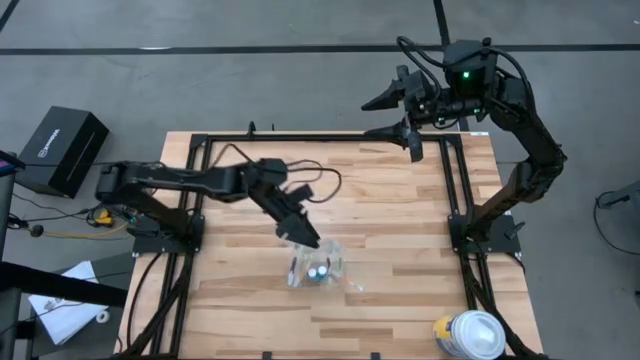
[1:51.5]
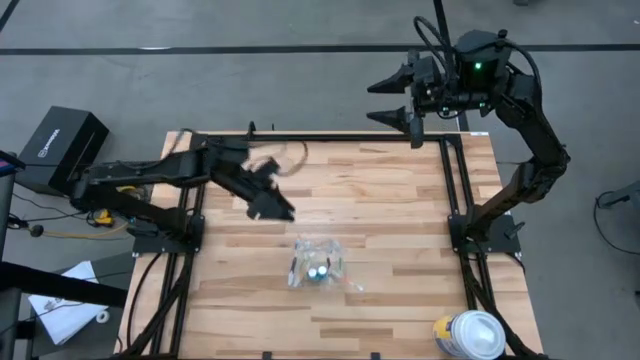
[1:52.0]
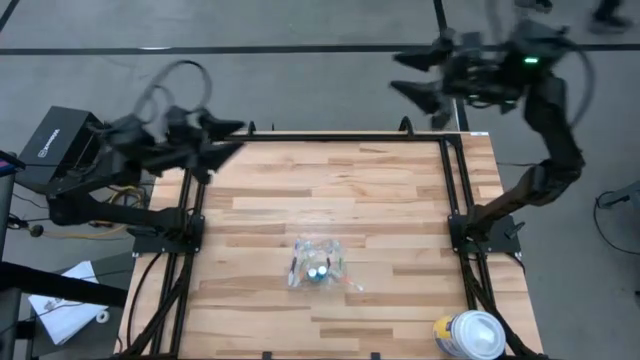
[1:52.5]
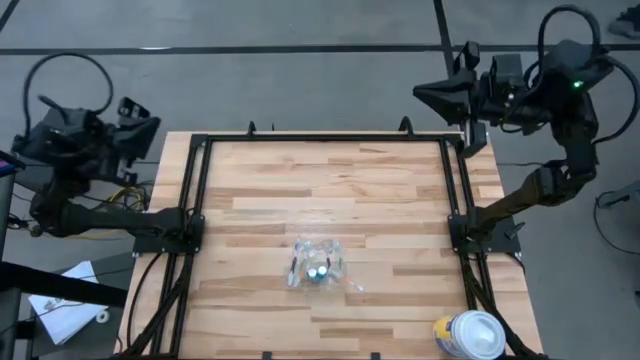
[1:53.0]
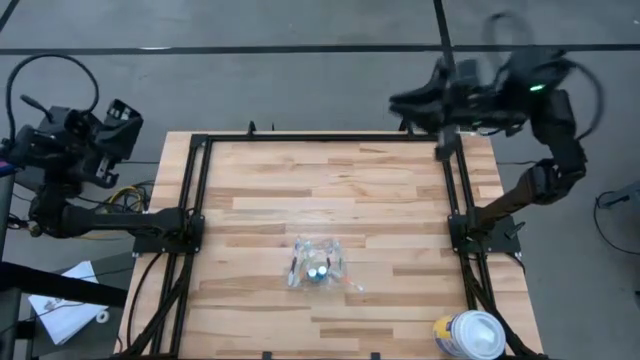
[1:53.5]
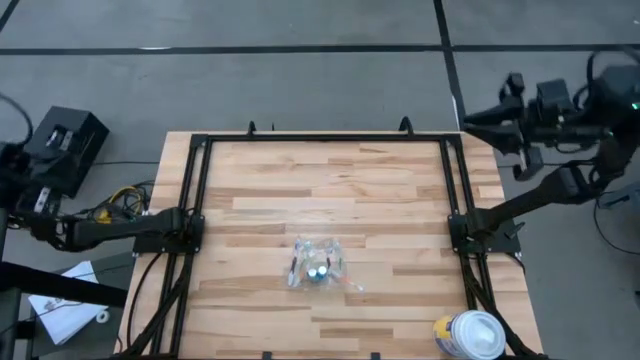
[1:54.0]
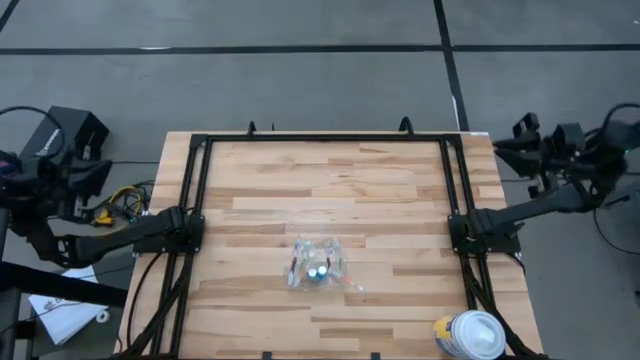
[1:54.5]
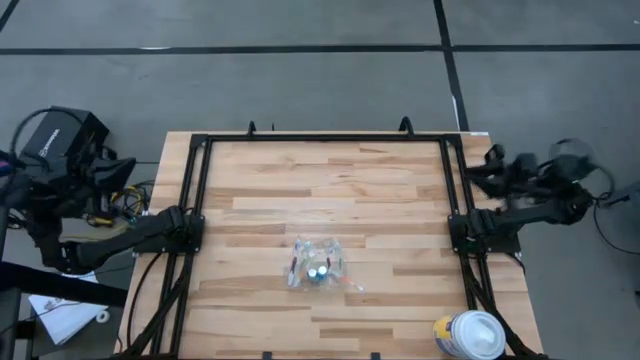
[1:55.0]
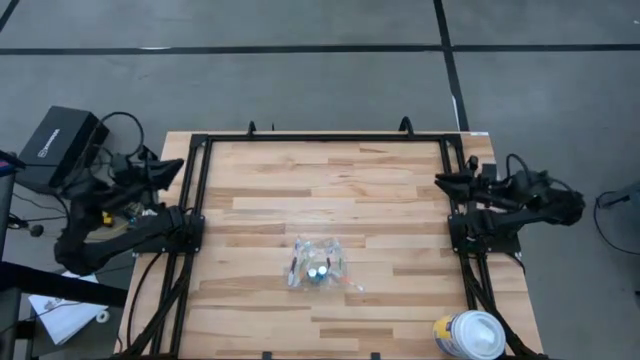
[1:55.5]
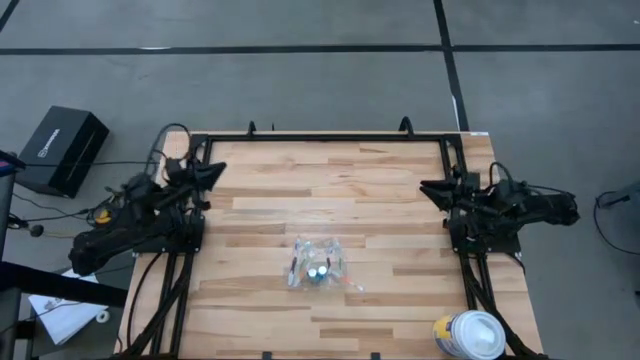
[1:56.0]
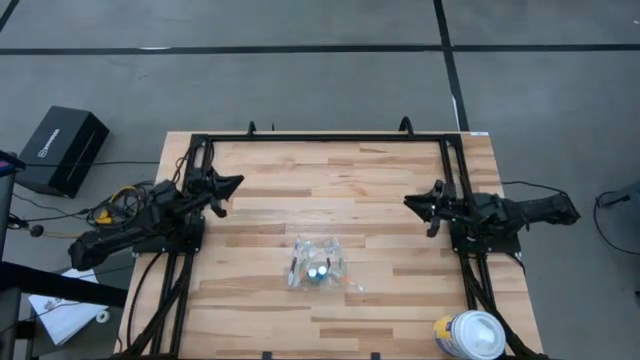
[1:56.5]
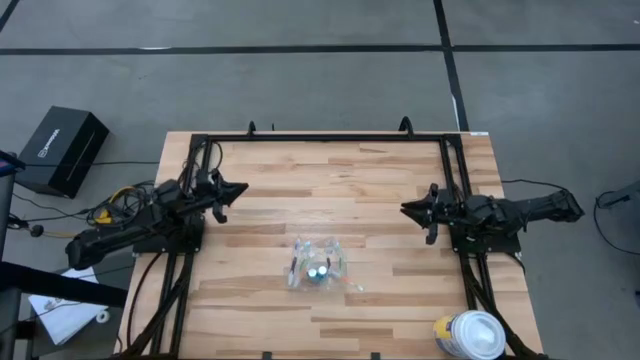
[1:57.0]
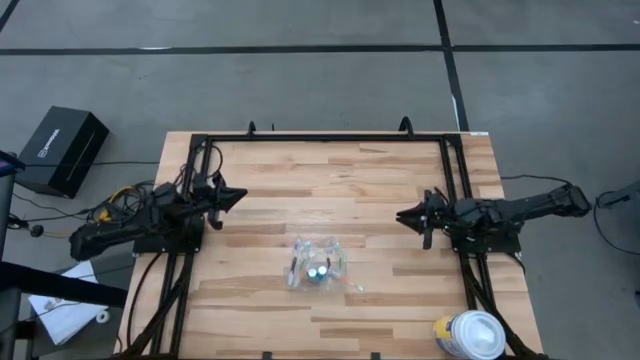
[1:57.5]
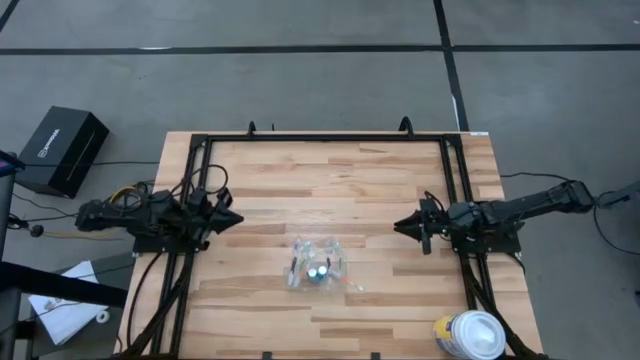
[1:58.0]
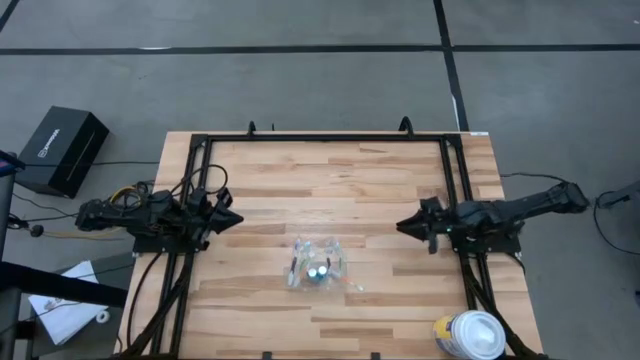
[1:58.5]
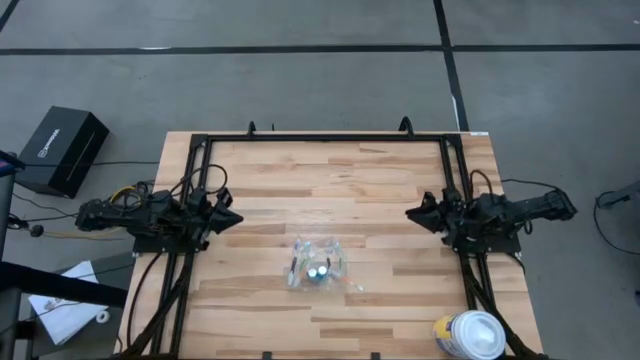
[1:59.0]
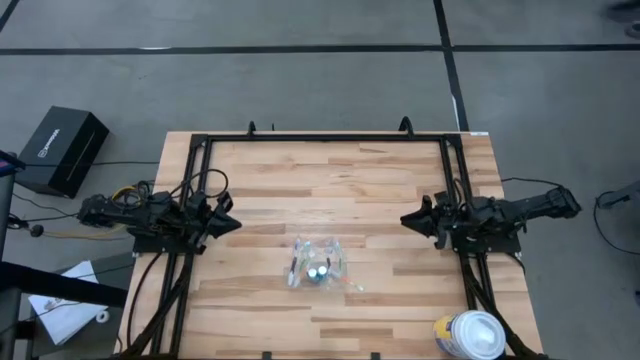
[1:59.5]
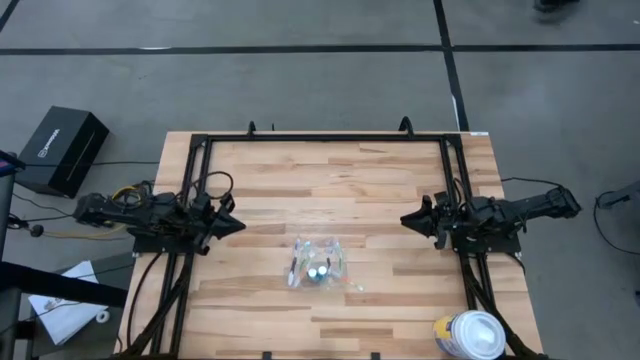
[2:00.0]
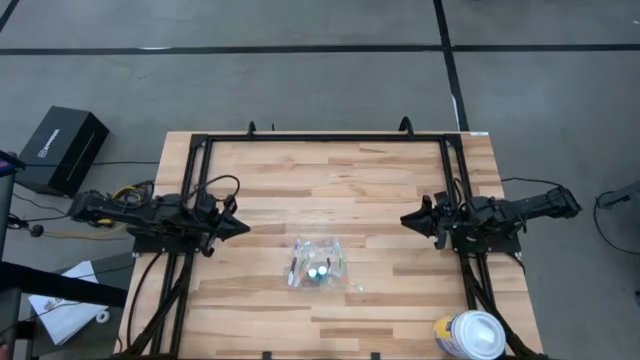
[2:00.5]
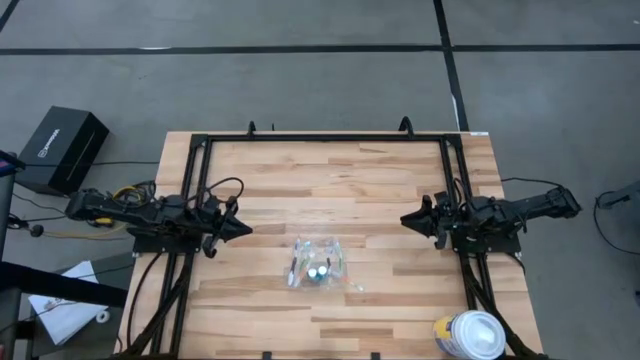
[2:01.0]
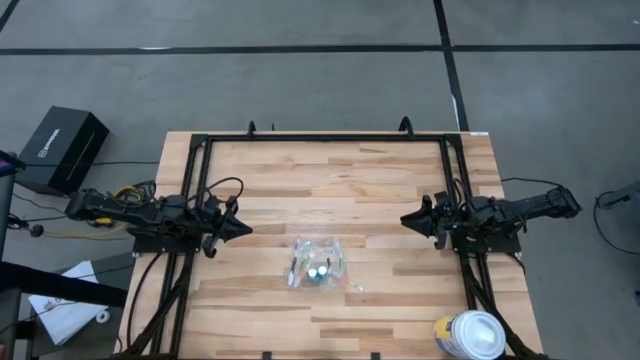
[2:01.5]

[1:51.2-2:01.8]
Task: Pick & Place toothbrushing station
Return to Home Position

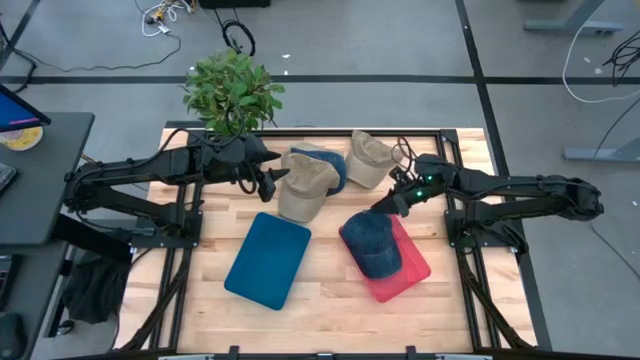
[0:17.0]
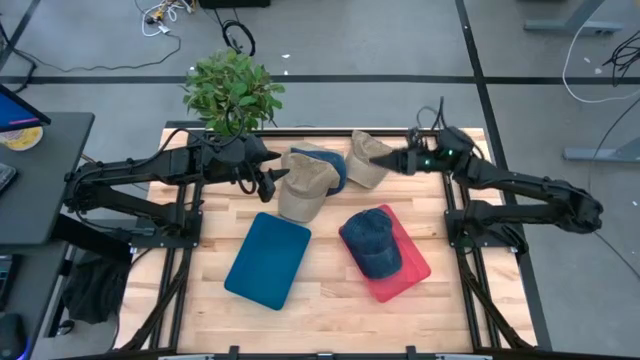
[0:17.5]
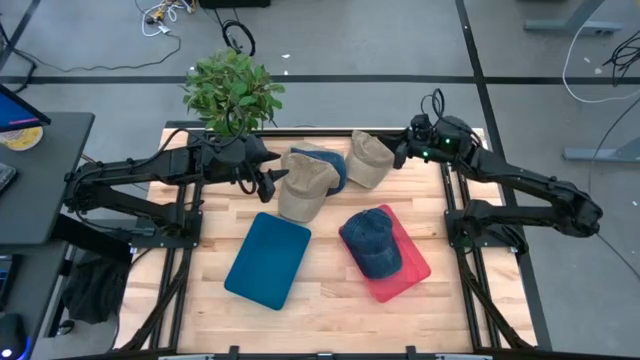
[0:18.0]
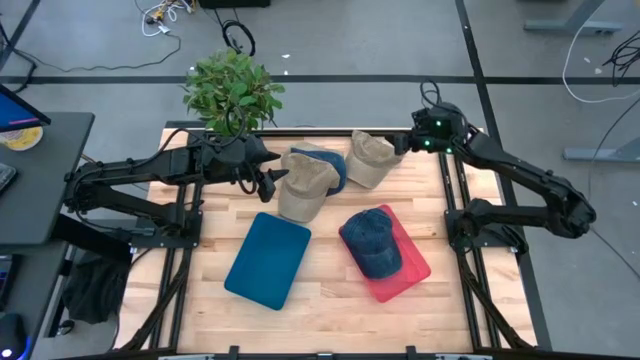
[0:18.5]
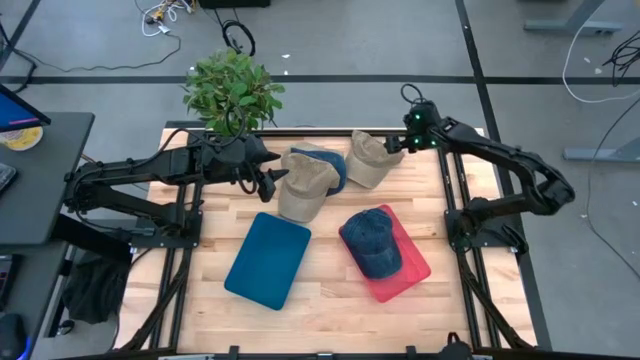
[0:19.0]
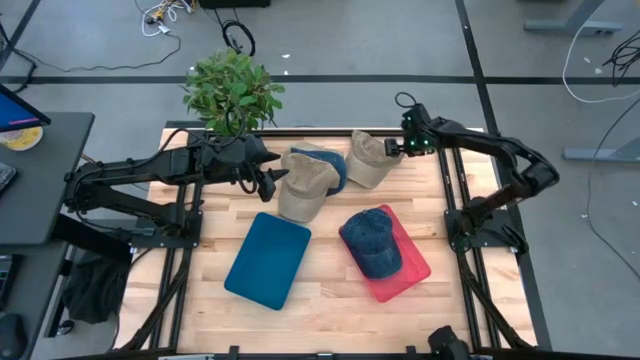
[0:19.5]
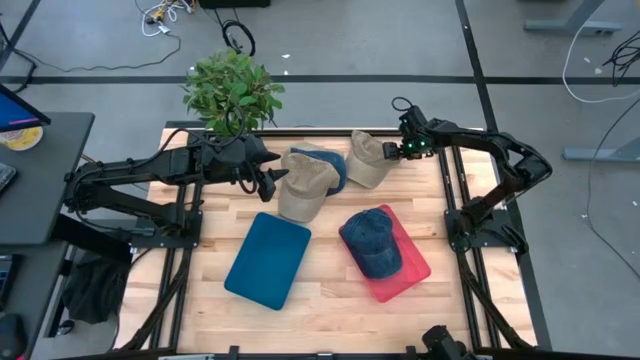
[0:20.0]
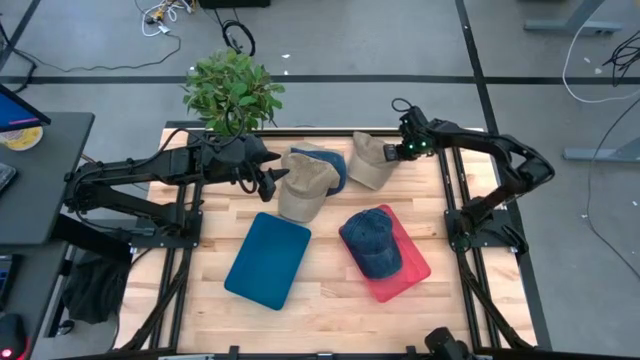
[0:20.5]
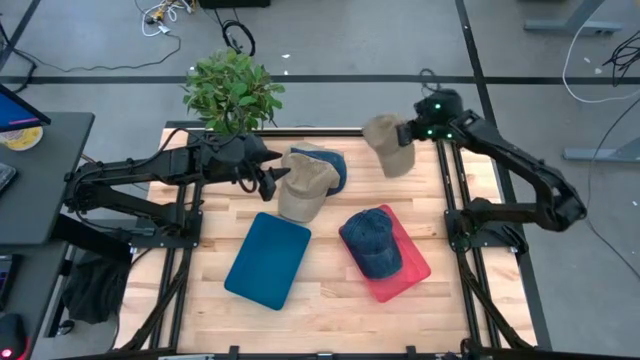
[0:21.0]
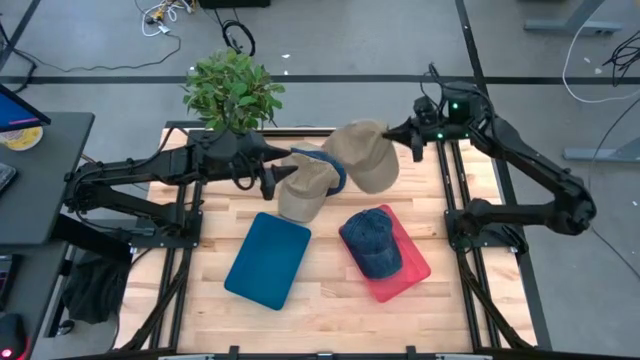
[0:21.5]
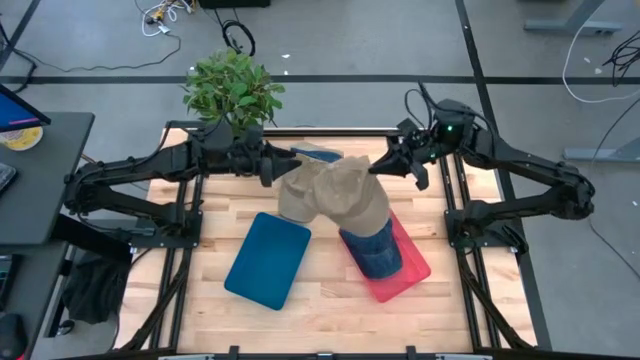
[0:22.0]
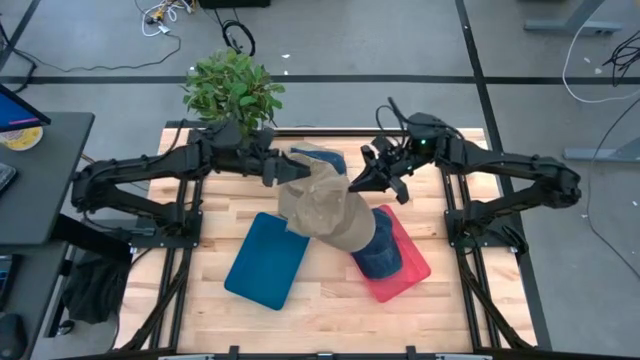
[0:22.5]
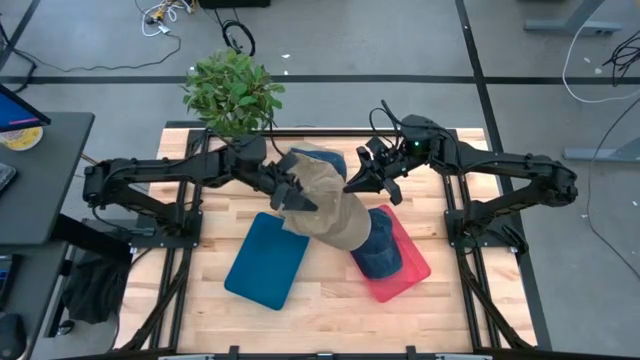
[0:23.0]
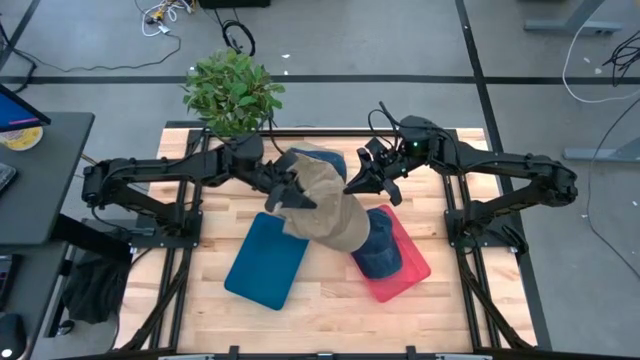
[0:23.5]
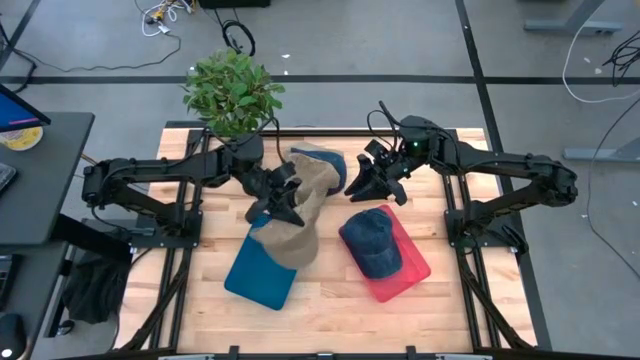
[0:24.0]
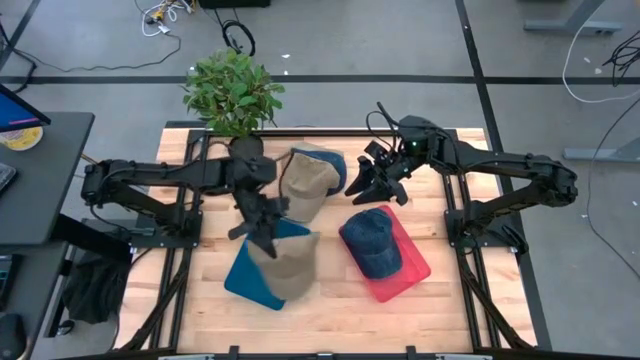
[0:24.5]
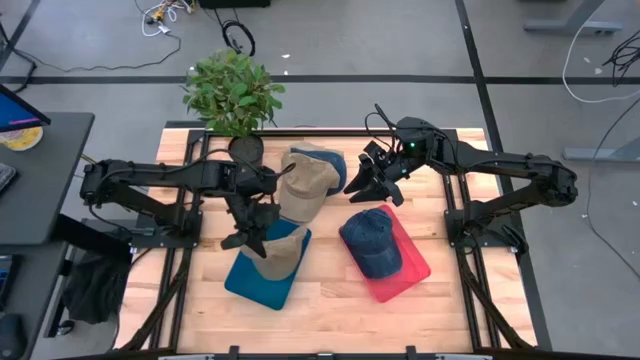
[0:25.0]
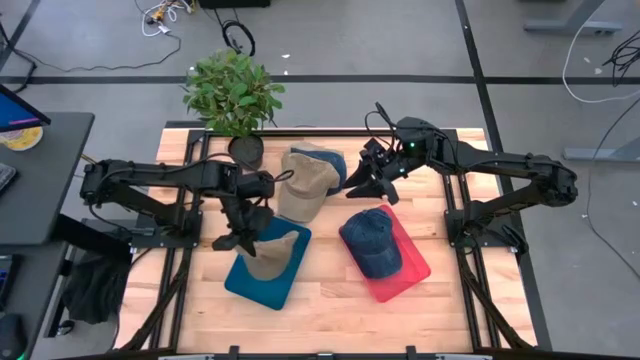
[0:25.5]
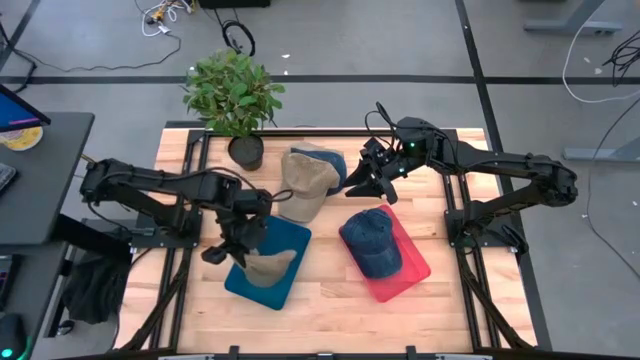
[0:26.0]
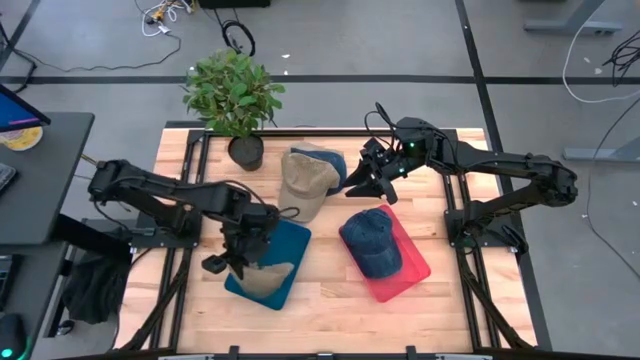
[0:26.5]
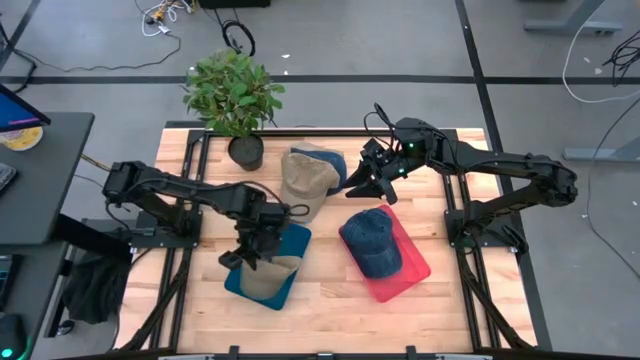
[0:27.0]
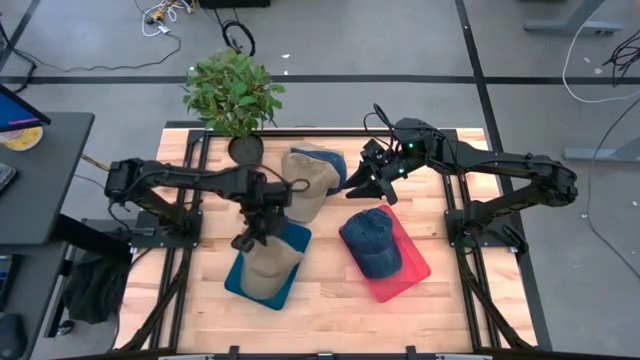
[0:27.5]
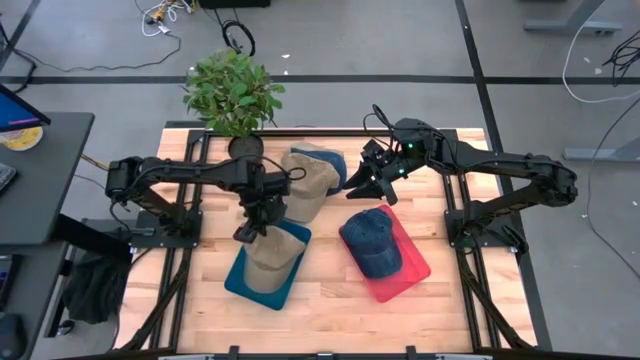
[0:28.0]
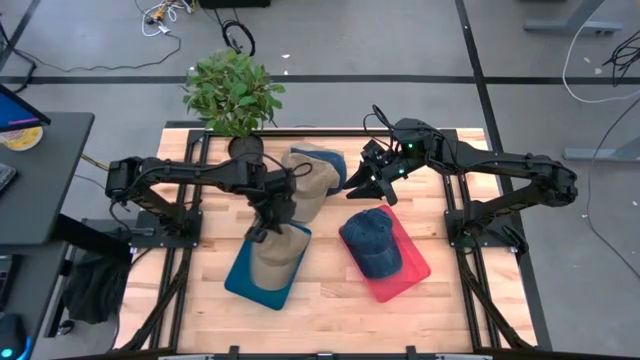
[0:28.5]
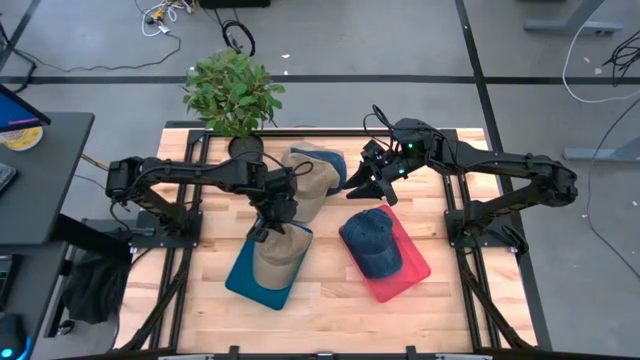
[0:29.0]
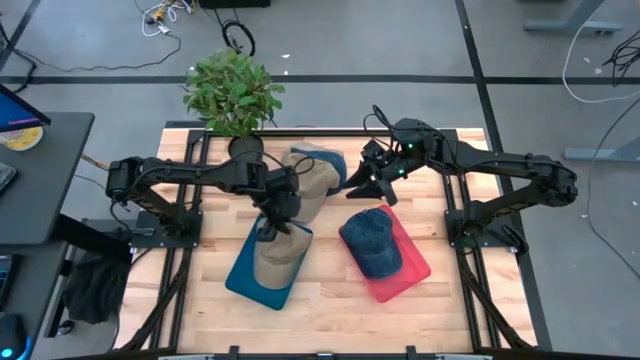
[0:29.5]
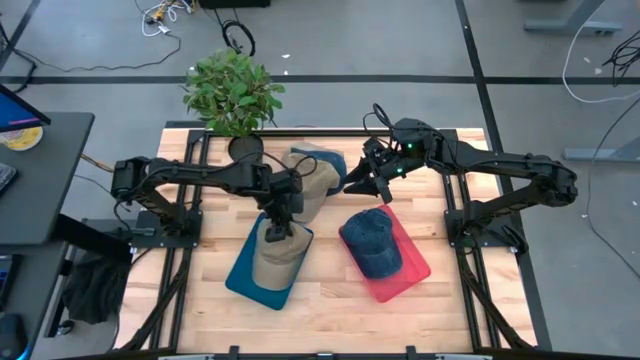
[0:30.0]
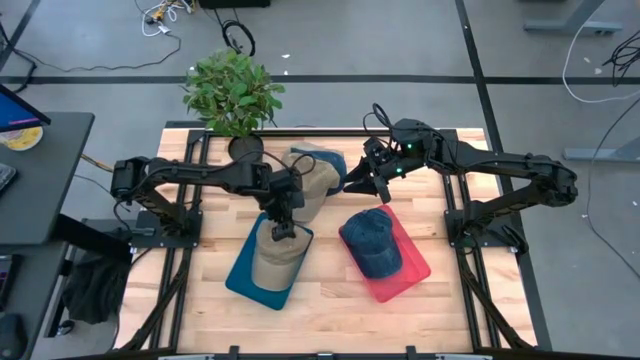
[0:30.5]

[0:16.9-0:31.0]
Task: Pick & Place hat
Put the brown cap into the blue bin
